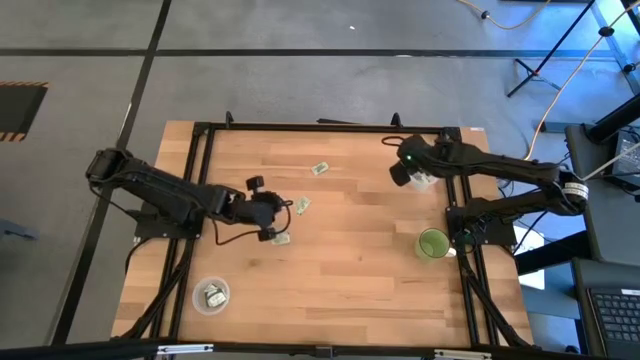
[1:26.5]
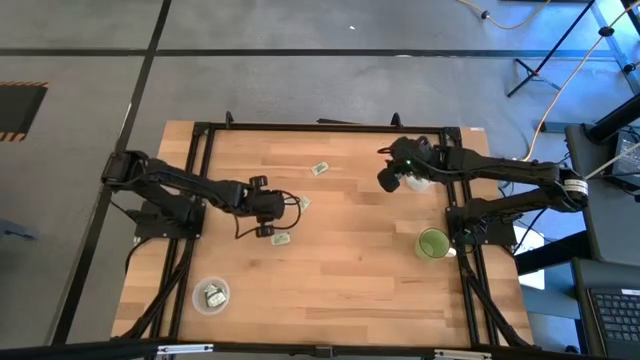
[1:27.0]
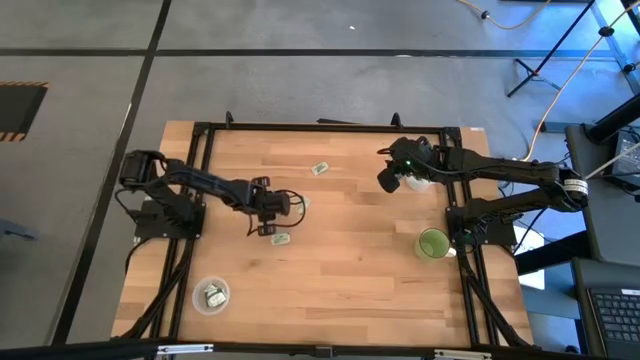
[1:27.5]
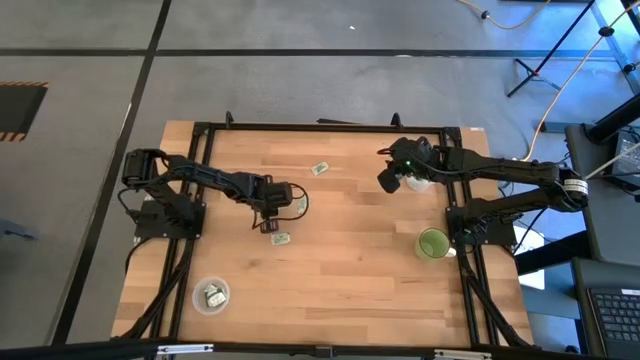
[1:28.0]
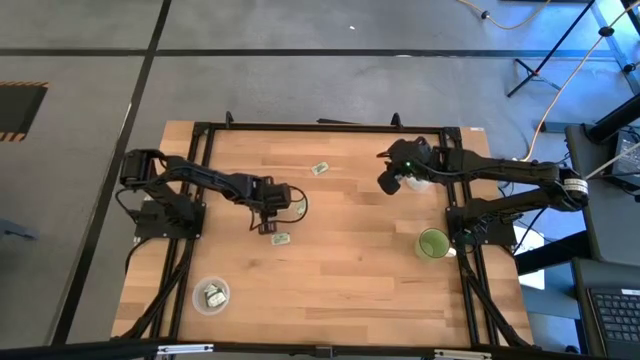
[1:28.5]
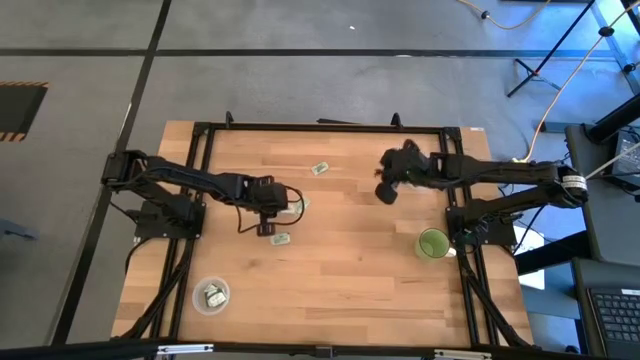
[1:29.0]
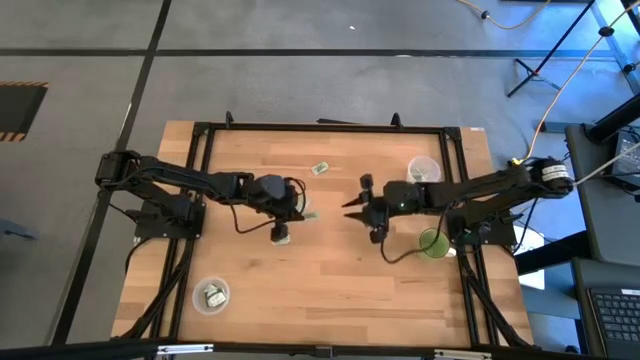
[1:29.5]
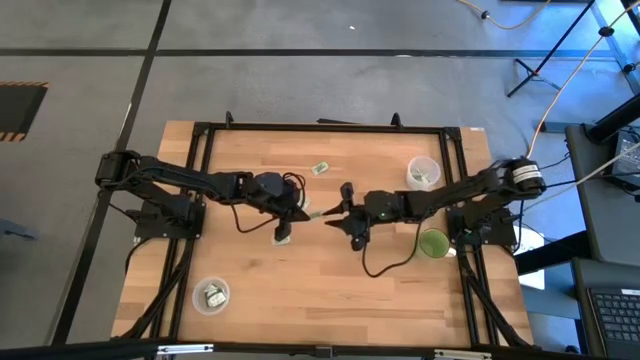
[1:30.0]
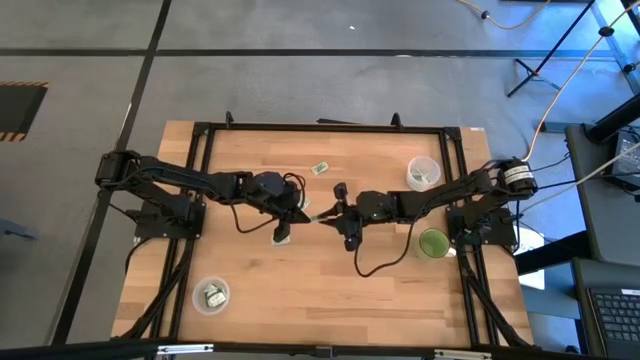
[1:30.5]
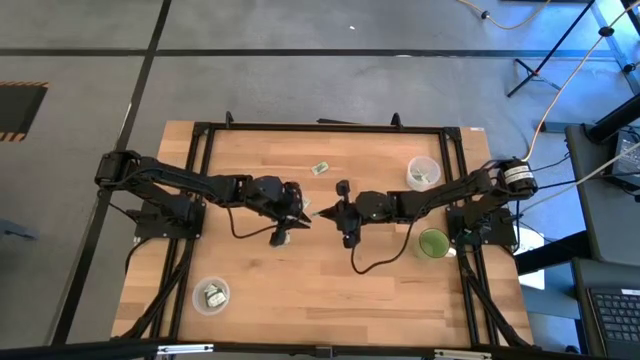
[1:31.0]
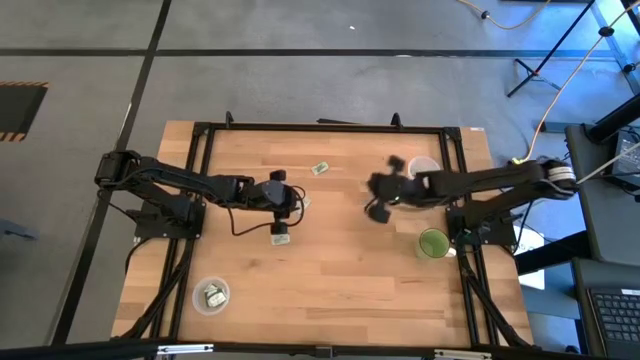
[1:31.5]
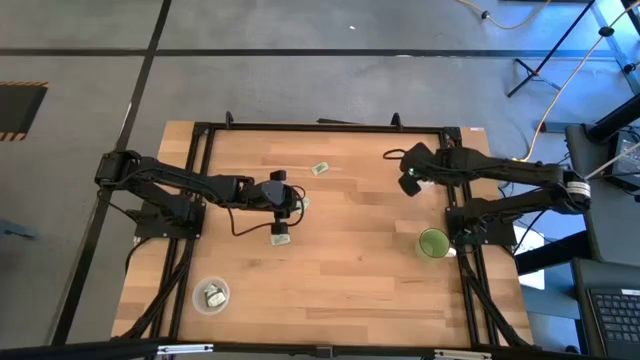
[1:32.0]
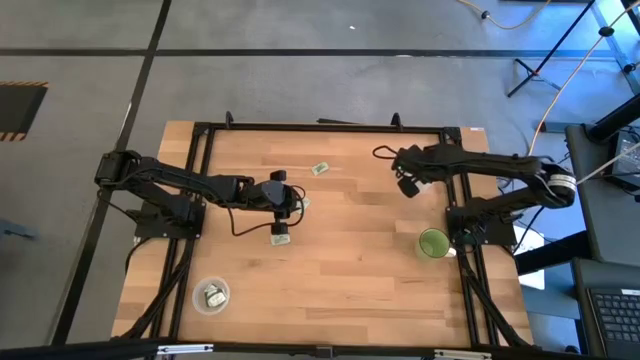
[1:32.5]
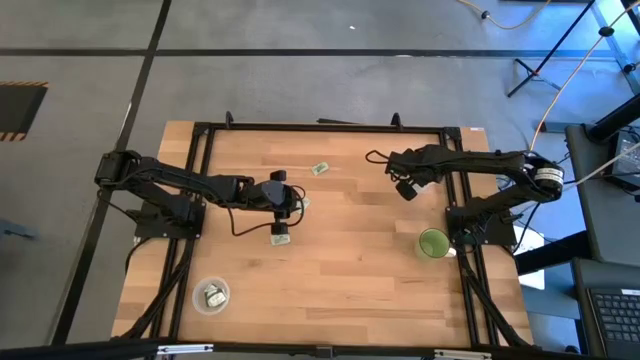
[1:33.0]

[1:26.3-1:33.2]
Task: Pick and place items into bin
Put the white stevia packet into the top white bin

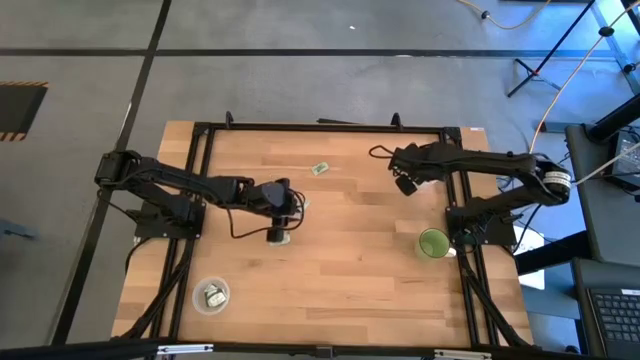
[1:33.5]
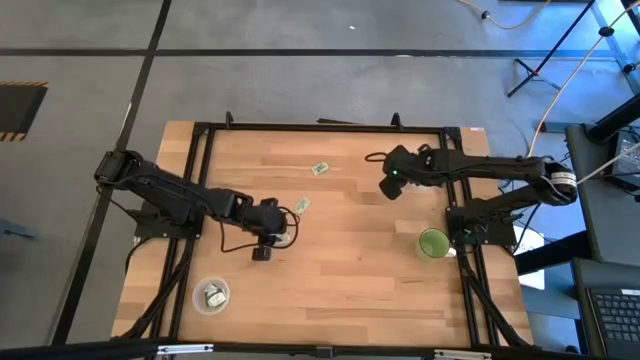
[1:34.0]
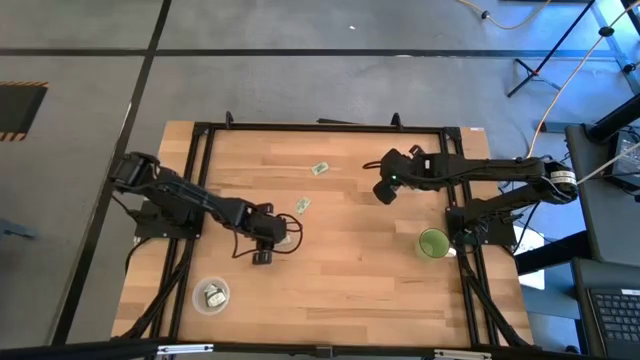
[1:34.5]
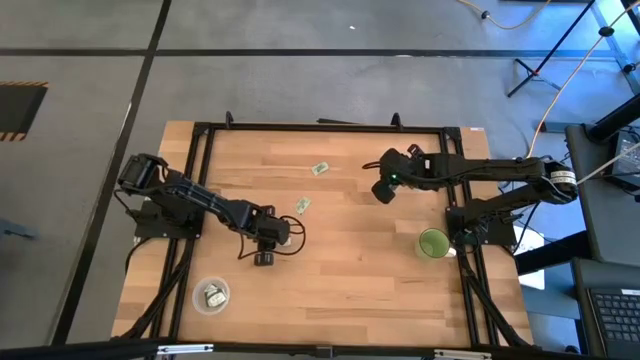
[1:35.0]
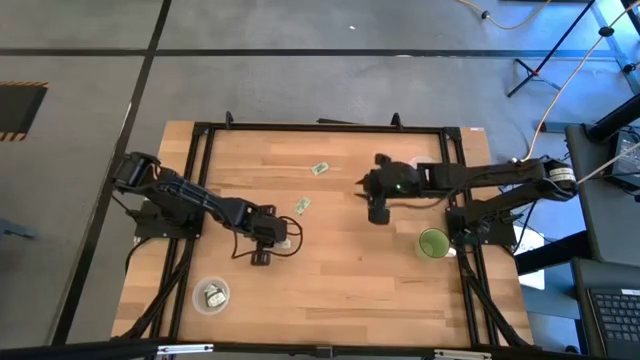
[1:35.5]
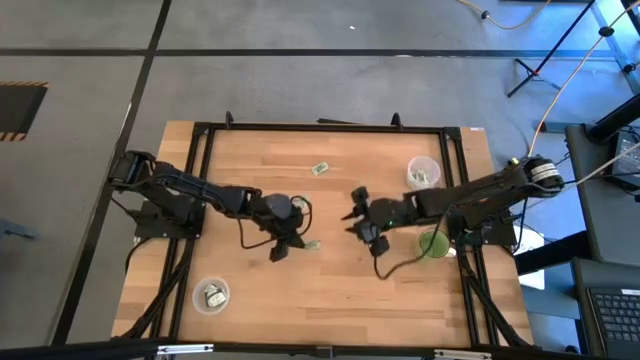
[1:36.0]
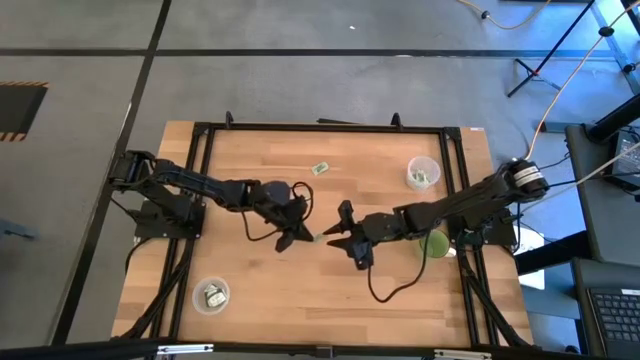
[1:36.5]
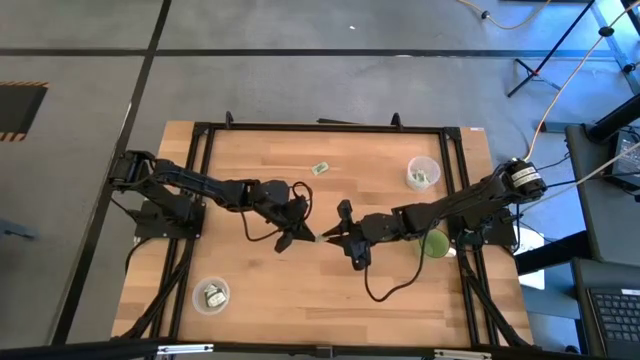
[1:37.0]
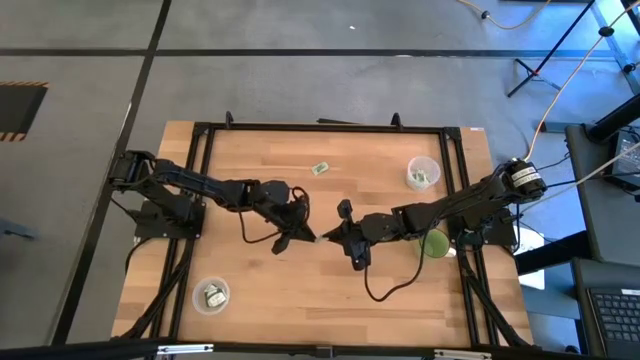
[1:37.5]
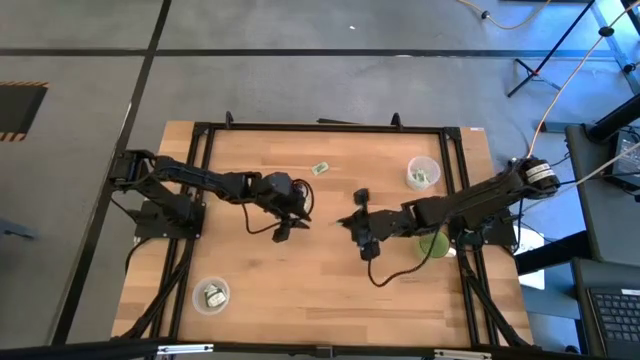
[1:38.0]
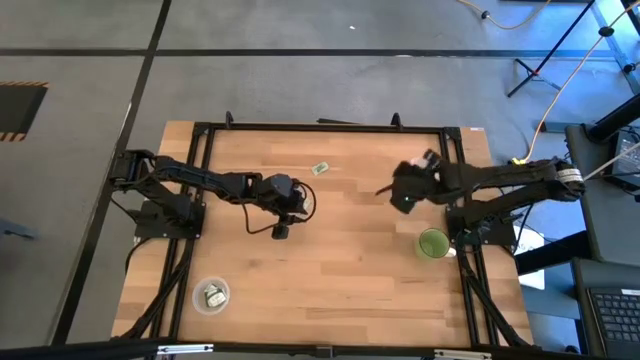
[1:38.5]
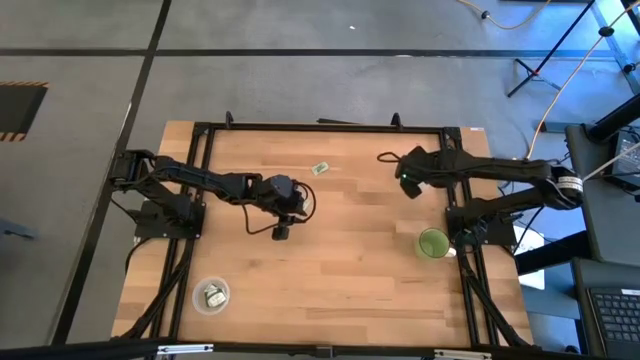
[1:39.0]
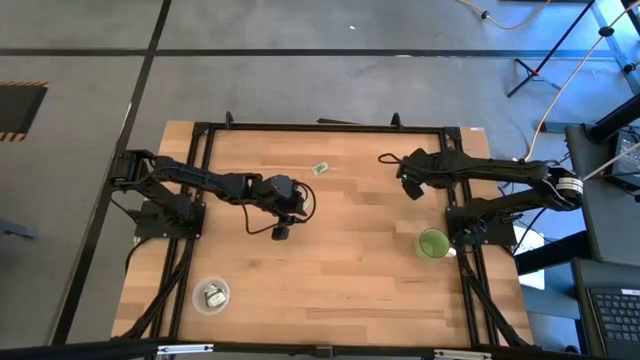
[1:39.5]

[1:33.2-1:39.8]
Put the white stevia packet into the top white bin

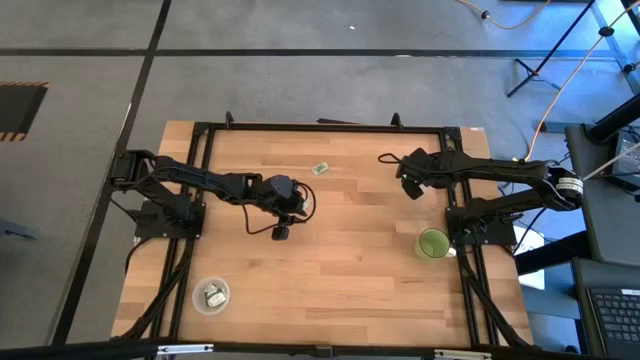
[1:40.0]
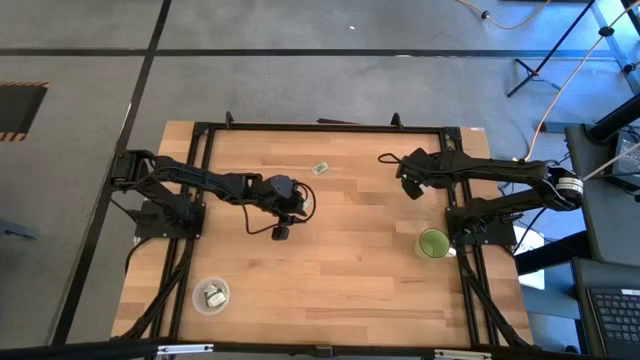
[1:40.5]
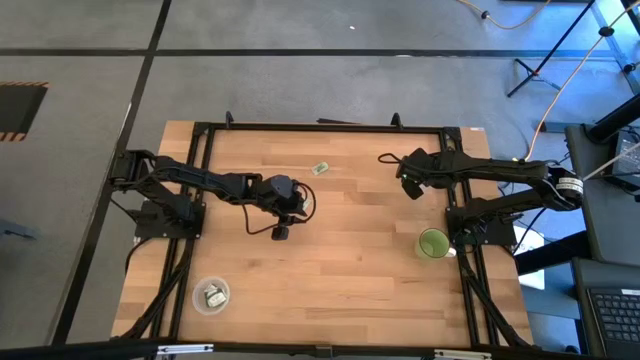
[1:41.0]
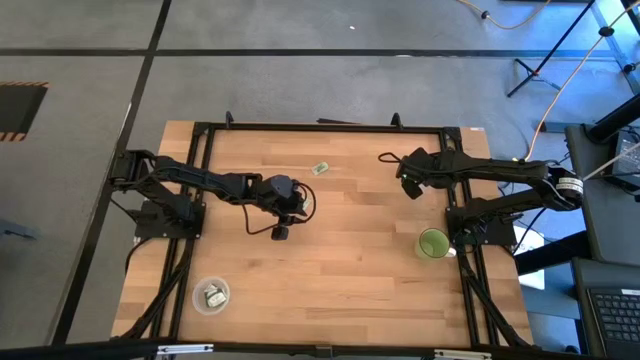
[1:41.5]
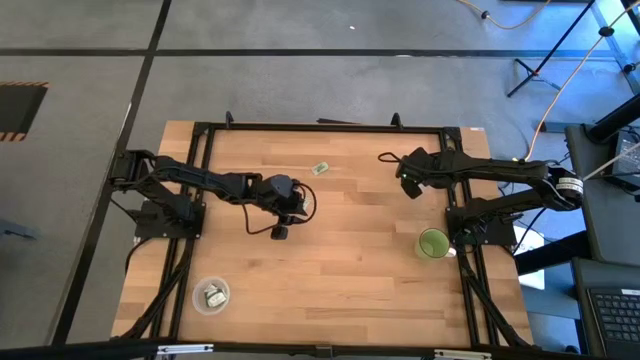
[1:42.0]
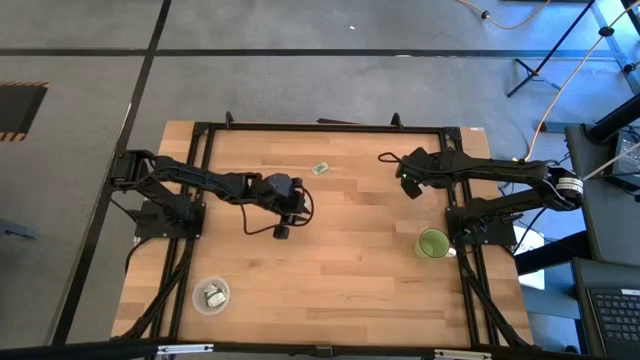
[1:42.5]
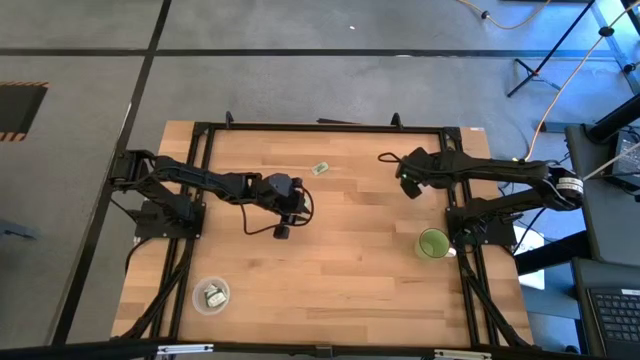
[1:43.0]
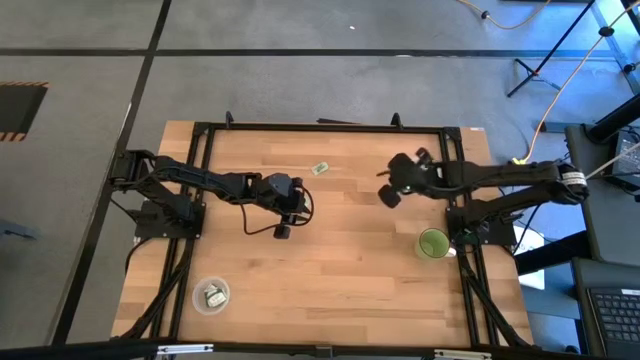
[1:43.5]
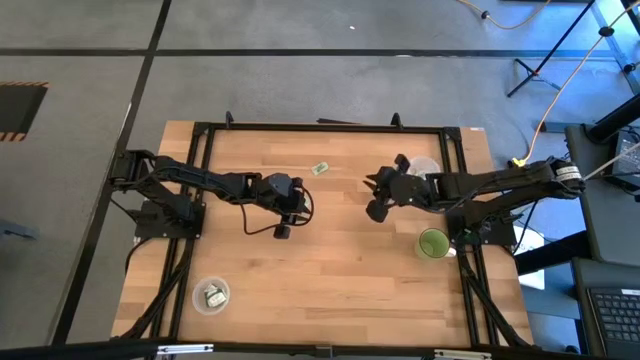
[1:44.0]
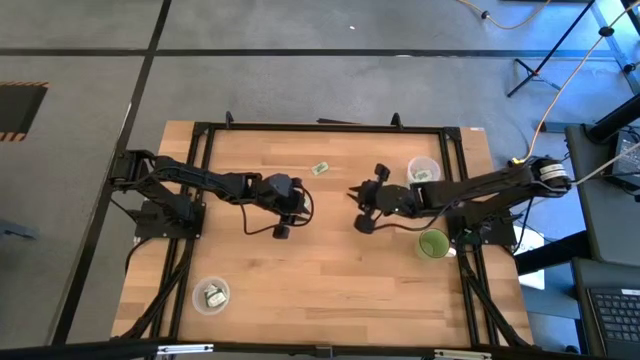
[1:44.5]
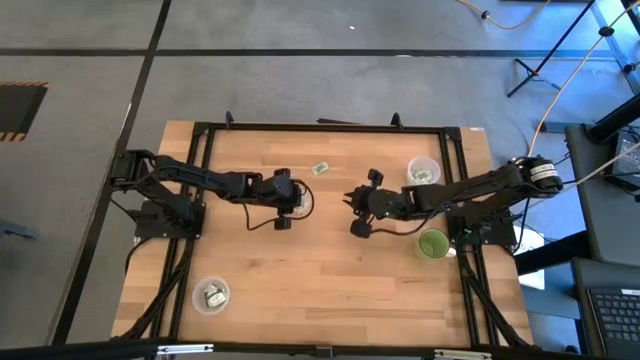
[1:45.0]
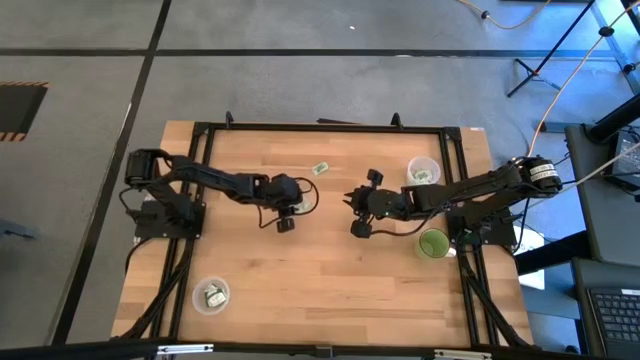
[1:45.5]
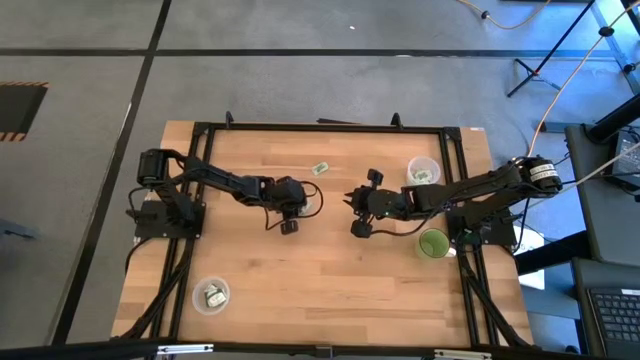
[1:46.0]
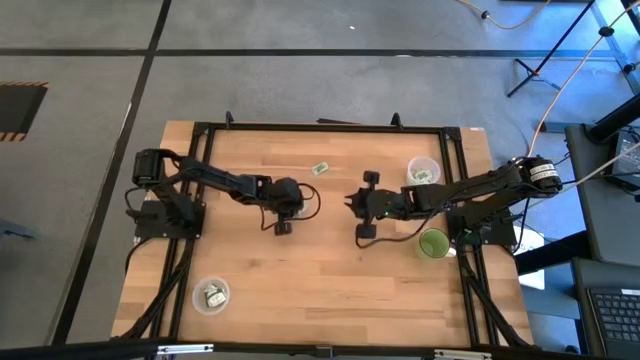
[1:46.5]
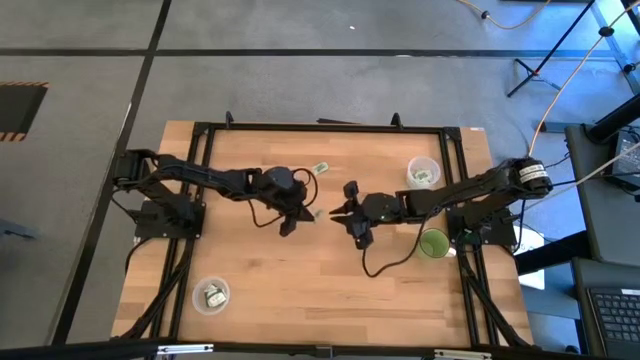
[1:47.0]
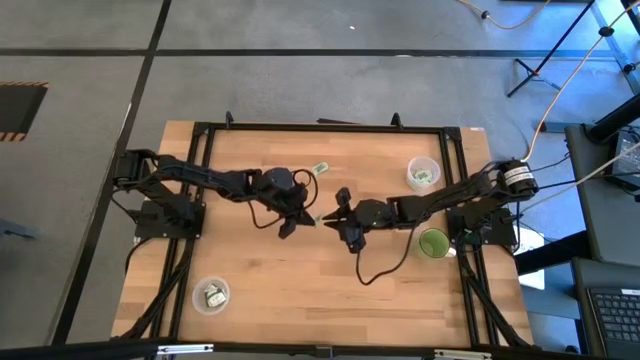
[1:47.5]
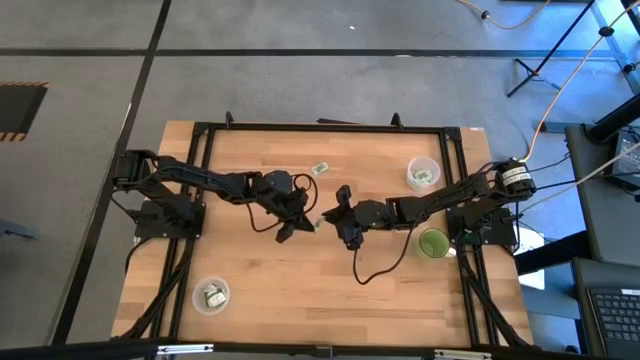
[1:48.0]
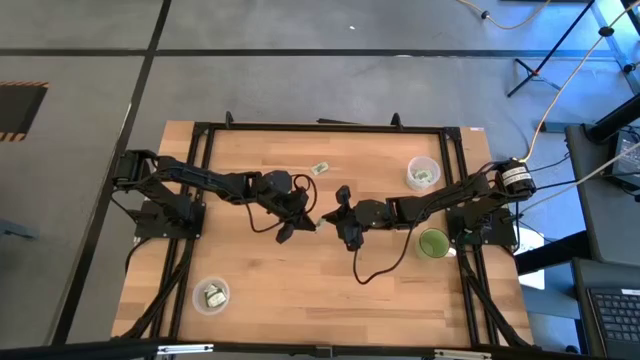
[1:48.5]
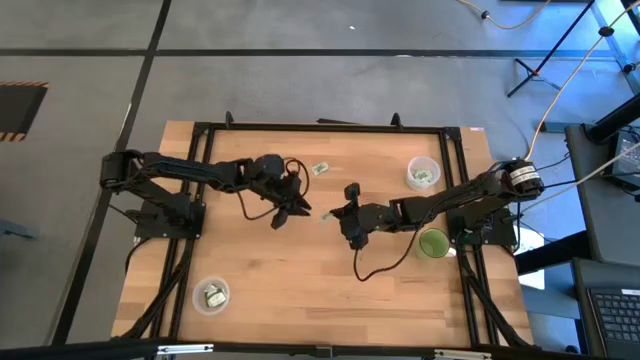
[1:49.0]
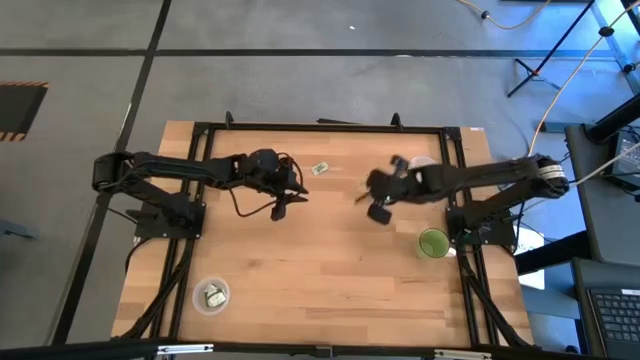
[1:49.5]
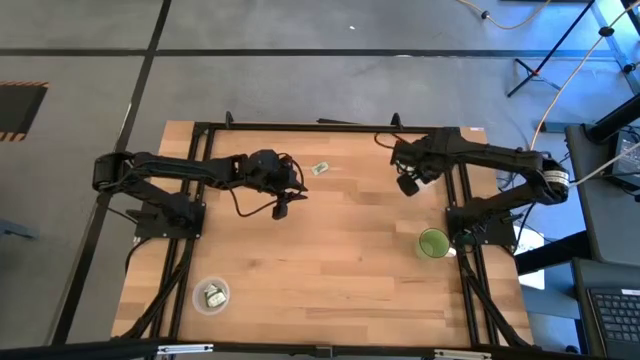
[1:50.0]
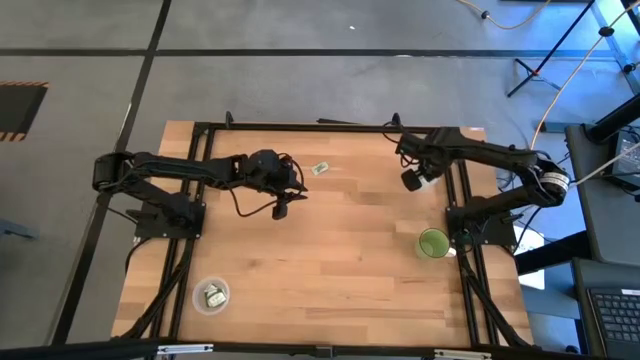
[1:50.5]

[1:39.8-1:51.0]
Put the white stevia packet into the top white bin
